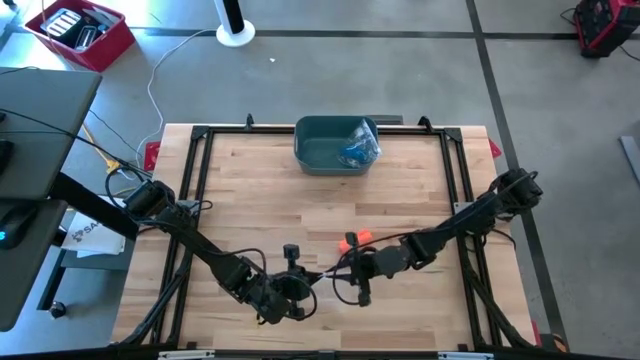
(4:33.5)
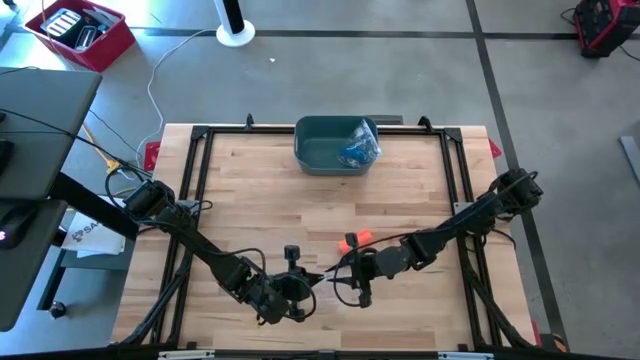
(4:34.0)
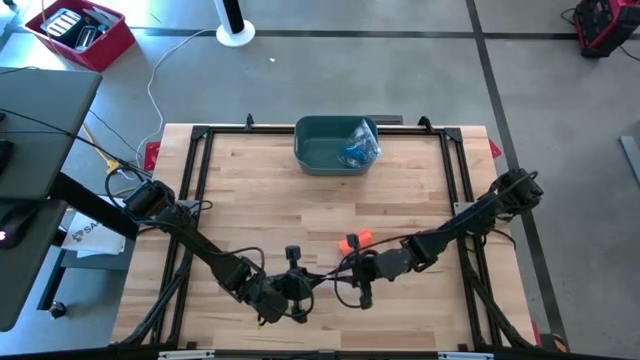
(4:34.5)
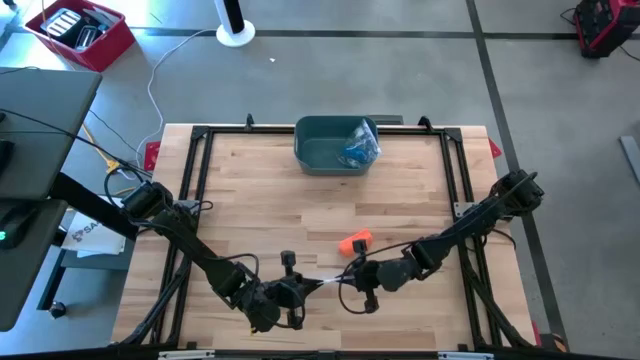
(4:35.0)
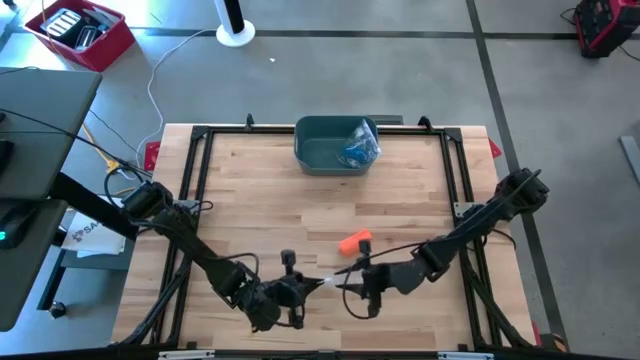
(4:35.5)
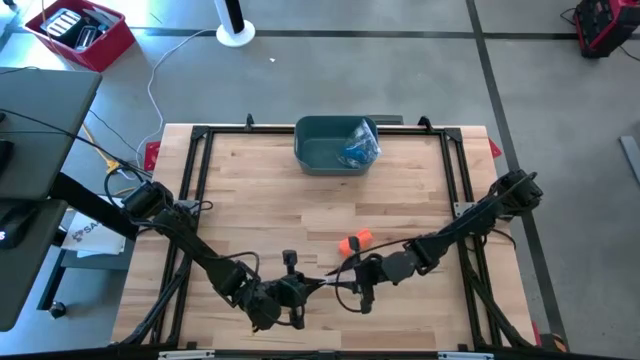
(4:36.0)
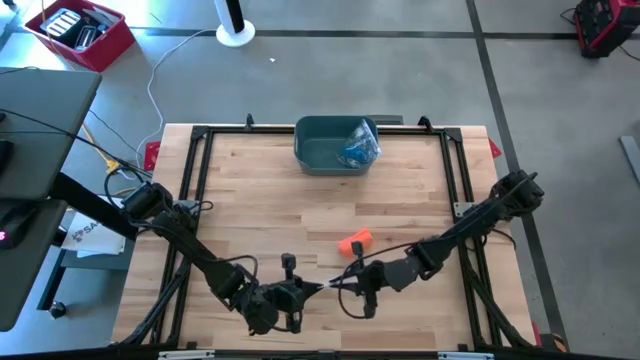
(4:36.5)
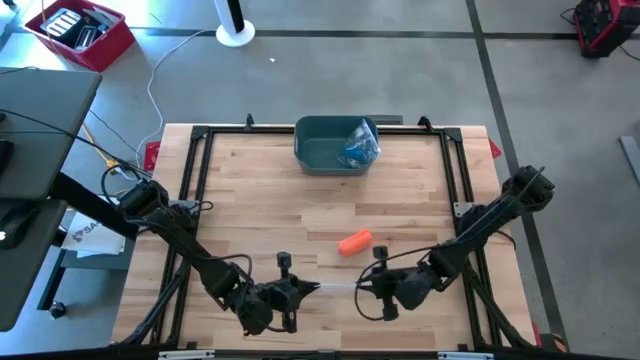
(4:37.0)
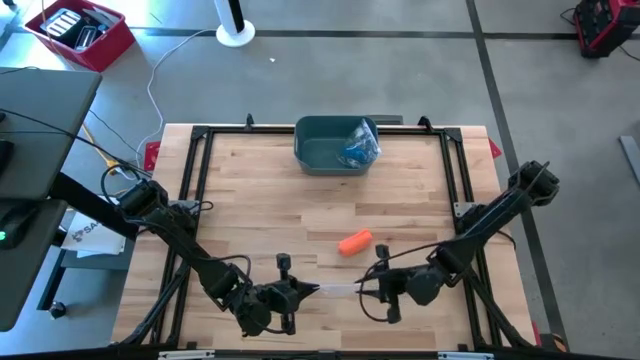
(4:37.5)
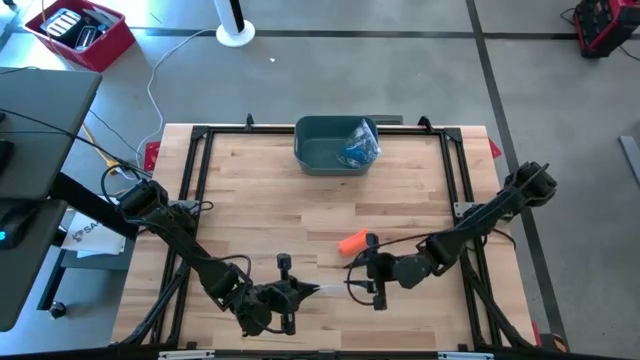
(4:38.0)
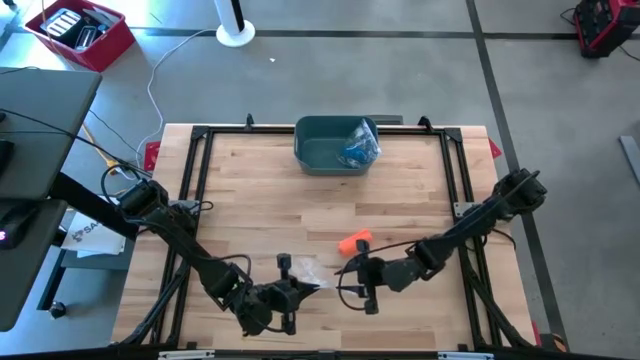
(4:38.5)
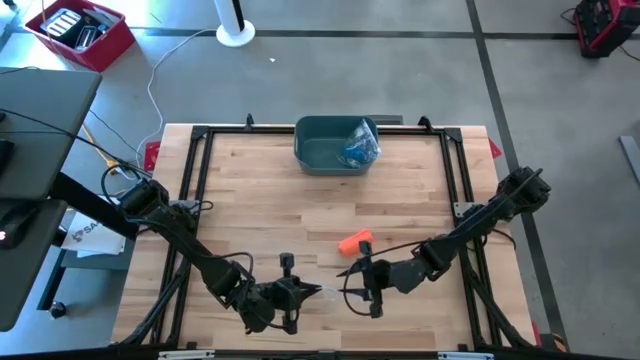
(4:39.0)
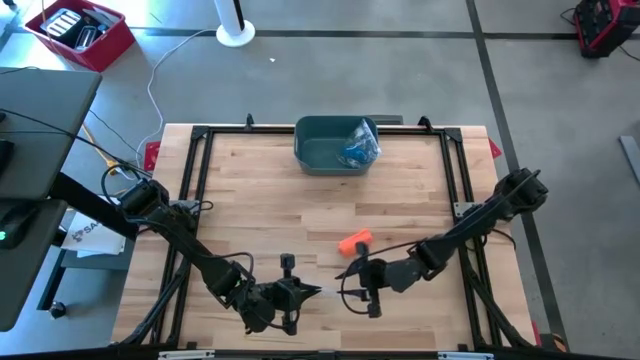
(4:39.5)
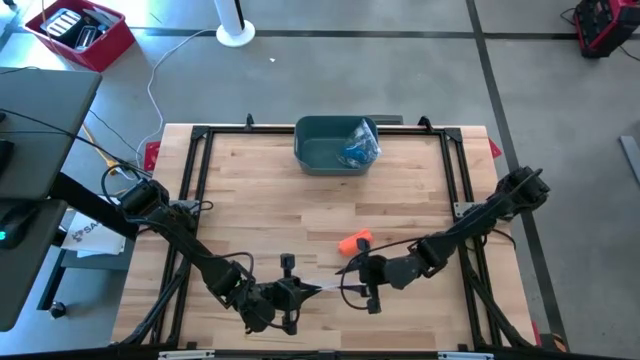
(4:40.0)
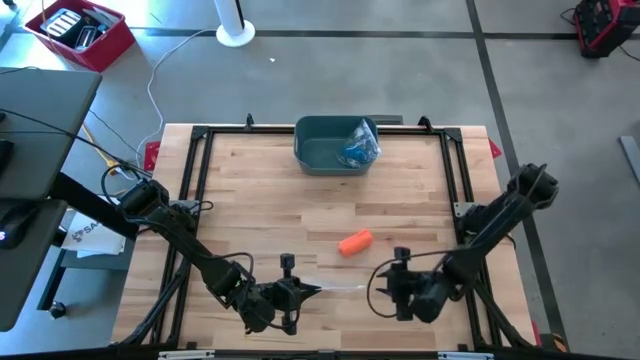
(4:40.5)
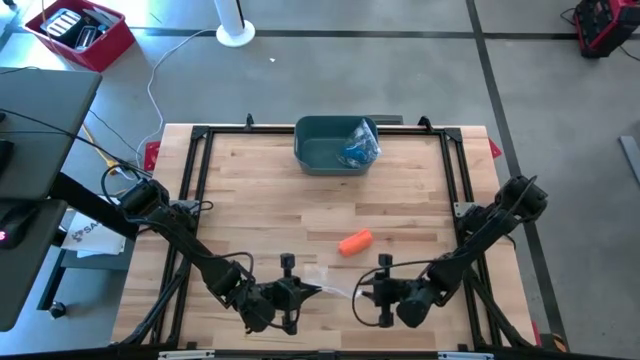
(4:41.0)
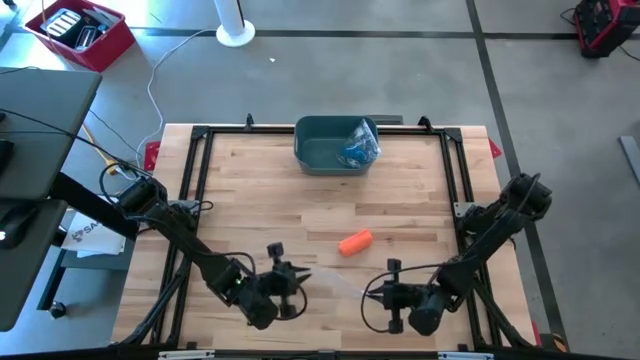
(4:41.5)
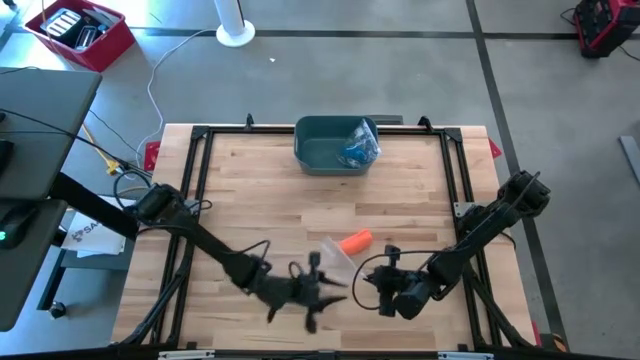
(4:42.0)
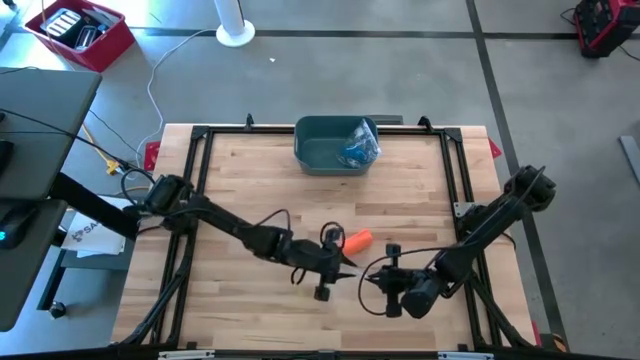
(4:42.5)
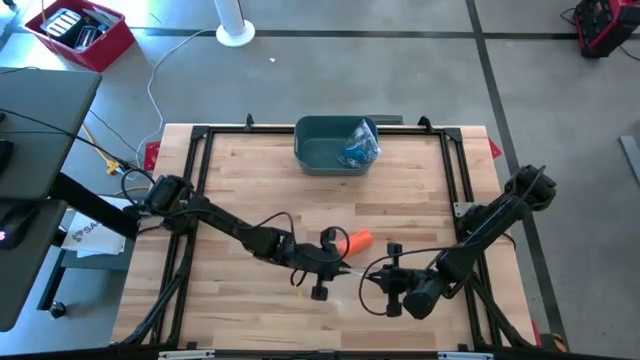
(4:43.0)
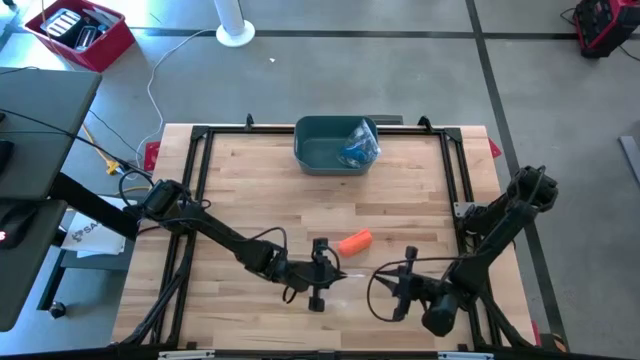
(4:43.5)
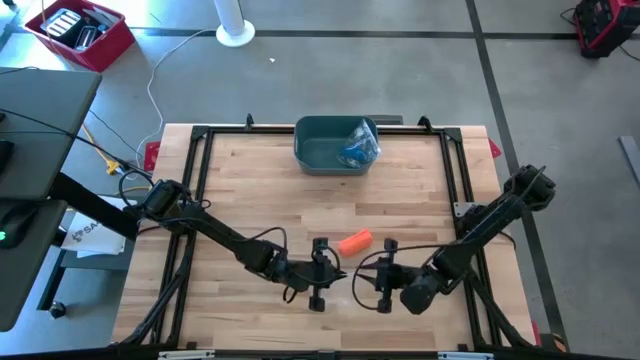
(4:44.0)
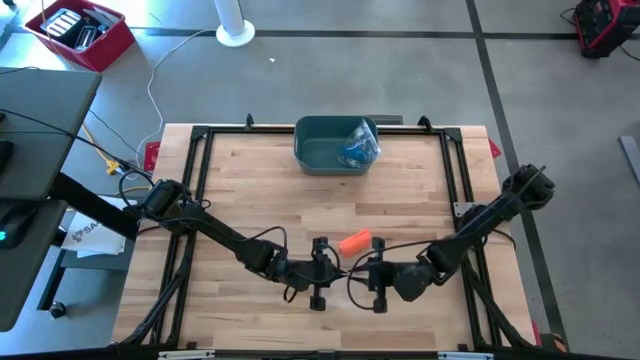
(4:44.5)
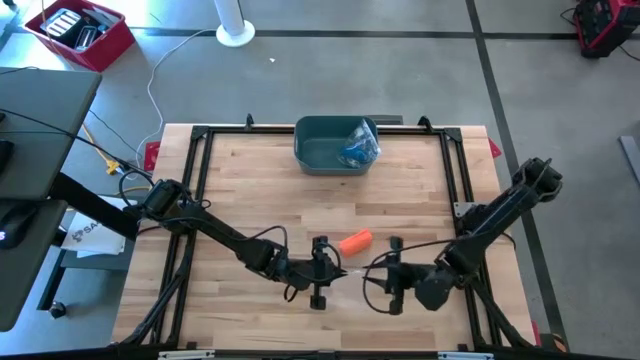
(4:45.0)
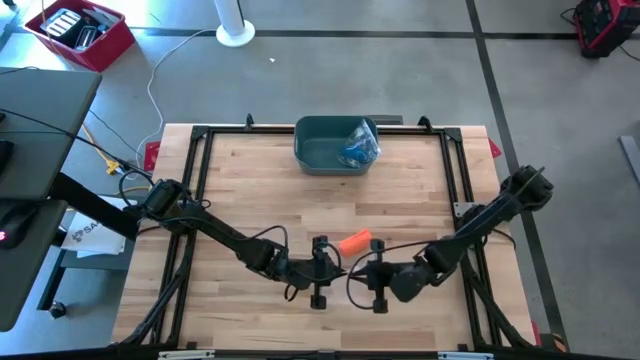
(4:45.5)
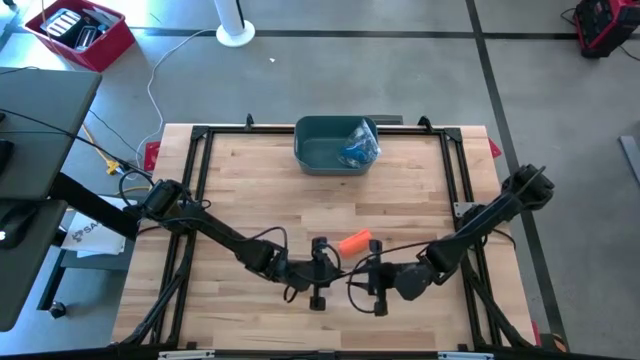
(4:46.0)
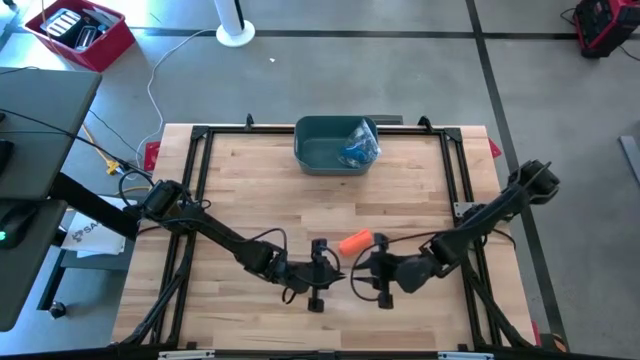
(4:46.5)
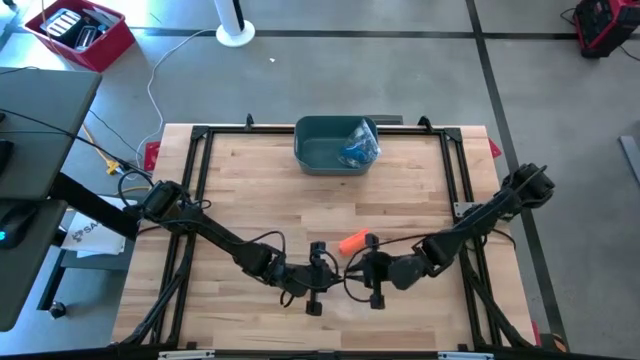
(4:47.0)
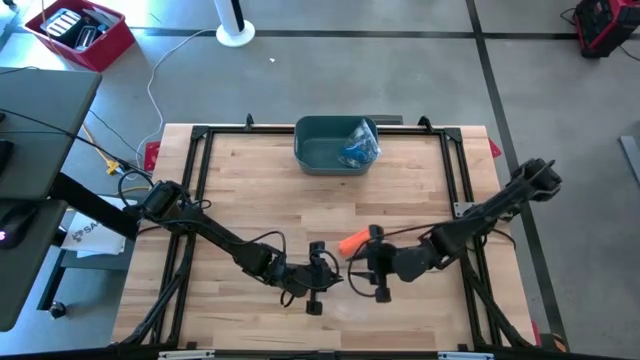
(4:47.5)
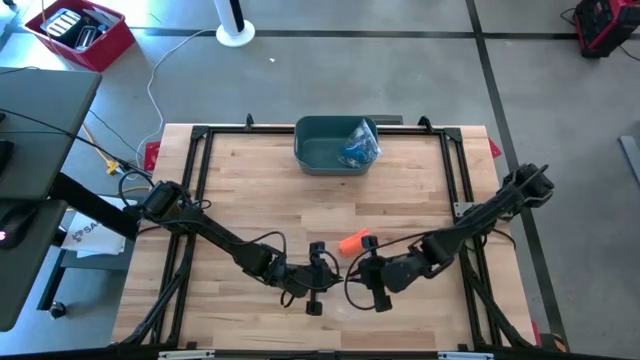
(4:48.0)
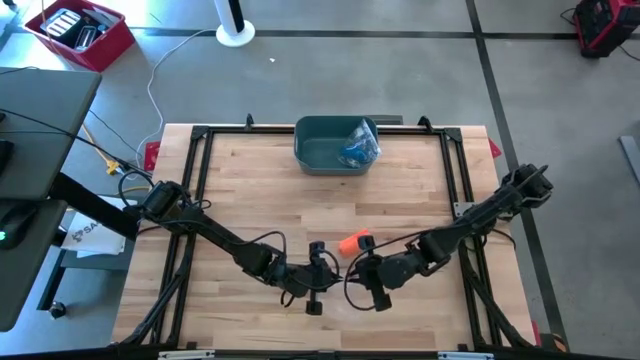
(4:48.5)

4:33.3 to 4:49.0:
Task: Roll bandage
Put the rolled orange bandage into the transparent zip bag
